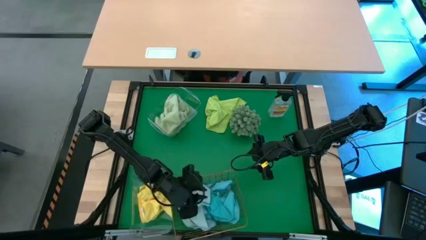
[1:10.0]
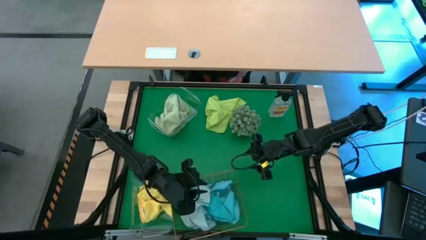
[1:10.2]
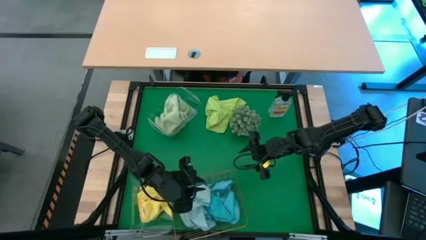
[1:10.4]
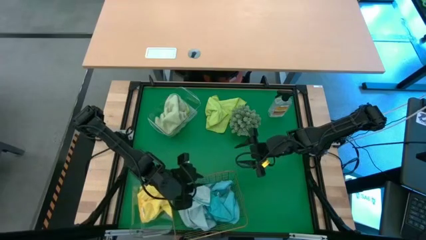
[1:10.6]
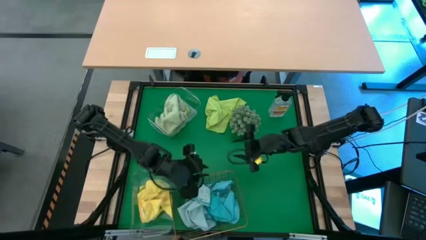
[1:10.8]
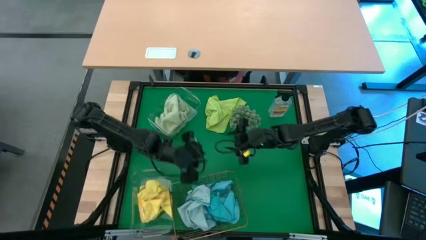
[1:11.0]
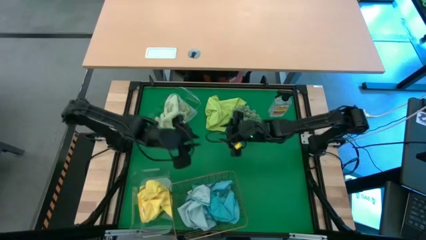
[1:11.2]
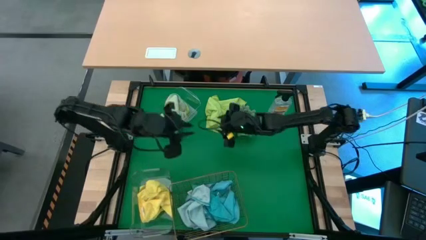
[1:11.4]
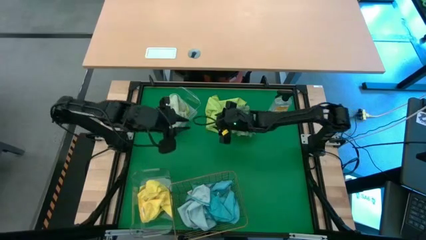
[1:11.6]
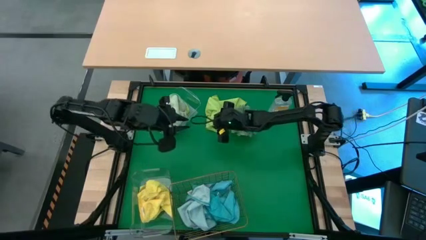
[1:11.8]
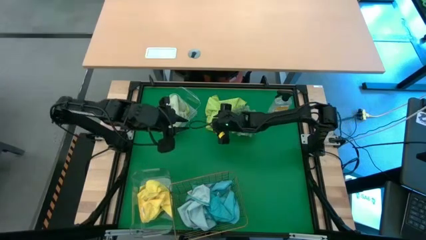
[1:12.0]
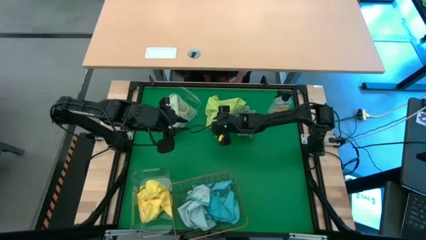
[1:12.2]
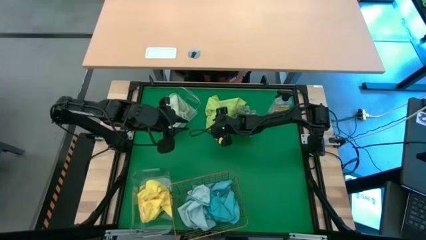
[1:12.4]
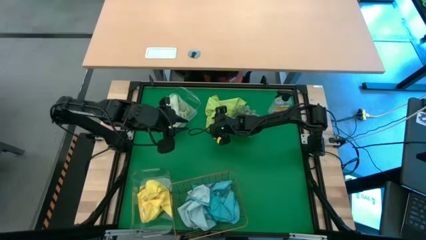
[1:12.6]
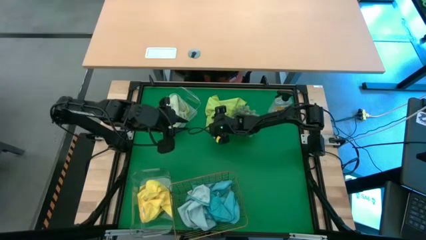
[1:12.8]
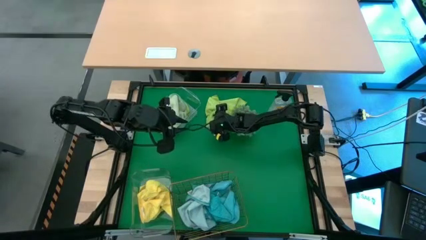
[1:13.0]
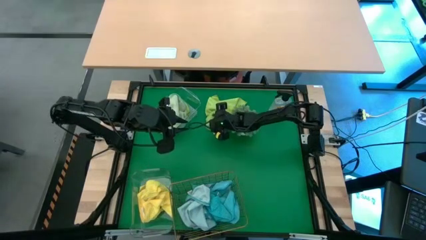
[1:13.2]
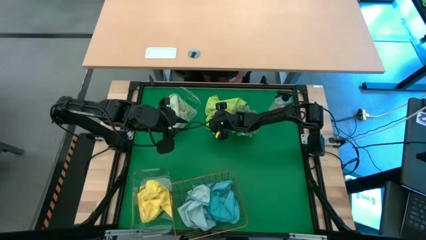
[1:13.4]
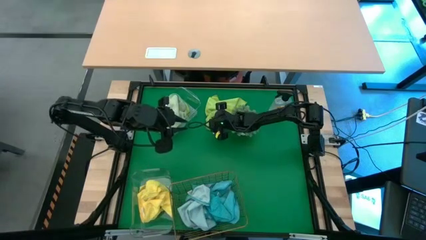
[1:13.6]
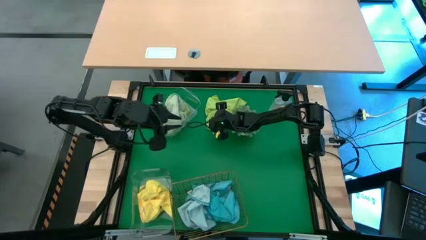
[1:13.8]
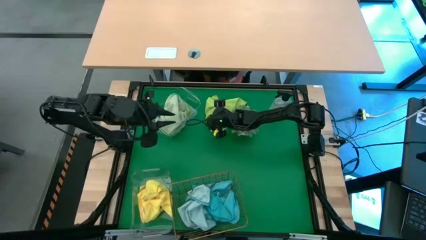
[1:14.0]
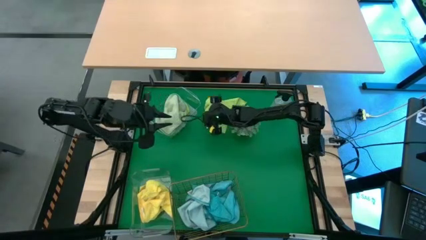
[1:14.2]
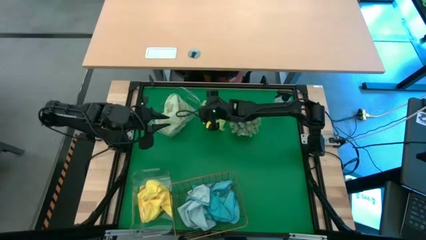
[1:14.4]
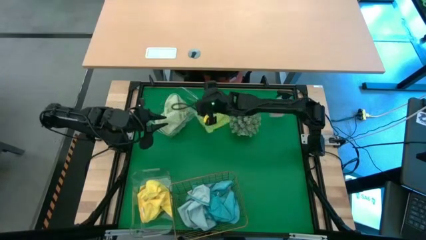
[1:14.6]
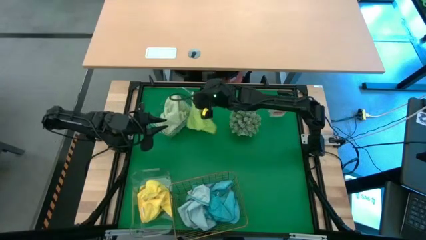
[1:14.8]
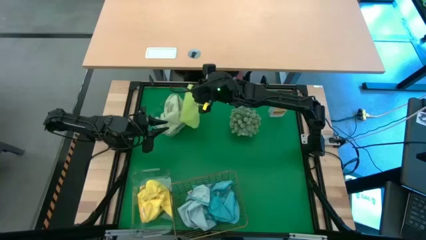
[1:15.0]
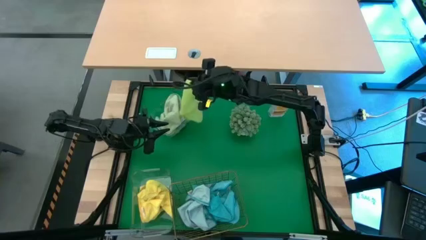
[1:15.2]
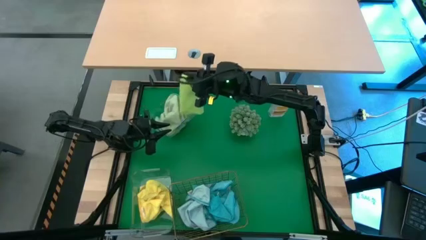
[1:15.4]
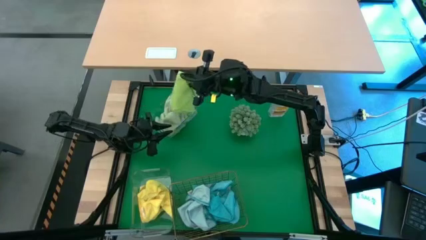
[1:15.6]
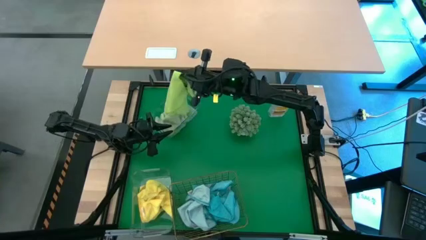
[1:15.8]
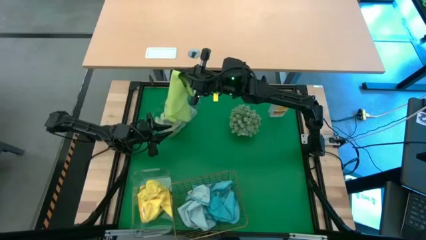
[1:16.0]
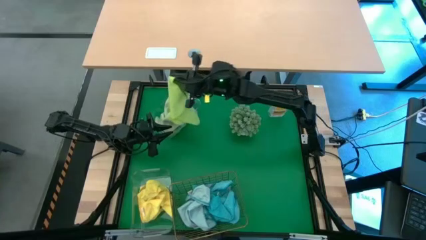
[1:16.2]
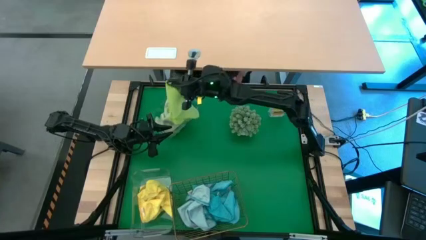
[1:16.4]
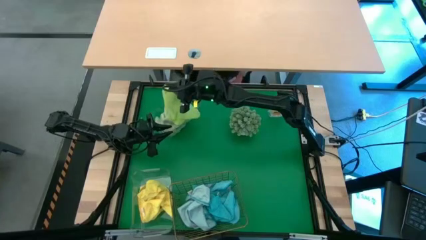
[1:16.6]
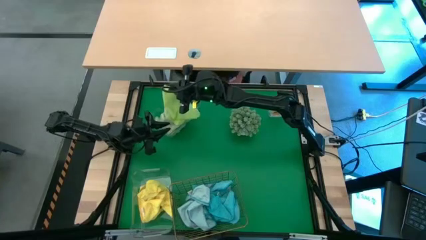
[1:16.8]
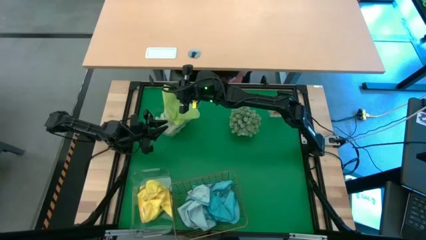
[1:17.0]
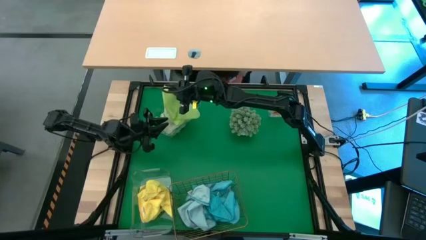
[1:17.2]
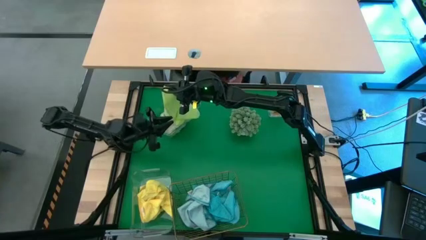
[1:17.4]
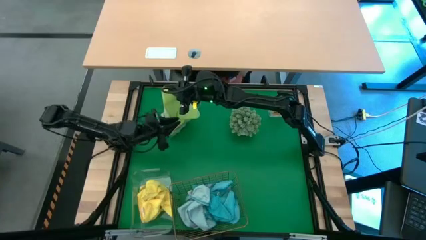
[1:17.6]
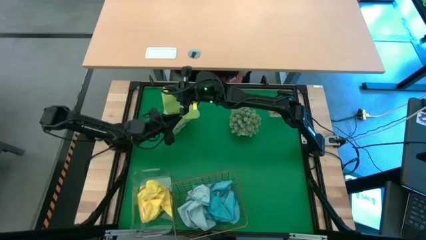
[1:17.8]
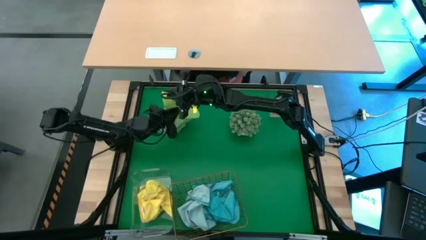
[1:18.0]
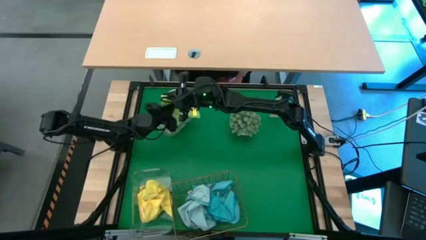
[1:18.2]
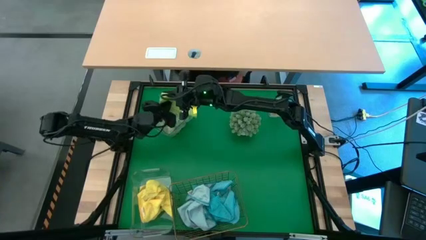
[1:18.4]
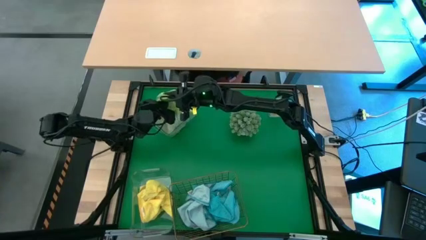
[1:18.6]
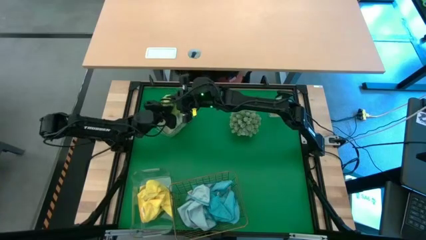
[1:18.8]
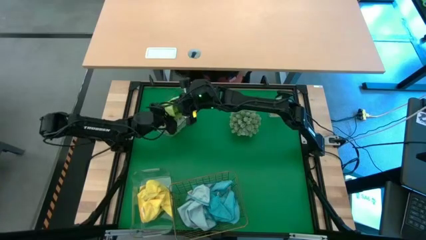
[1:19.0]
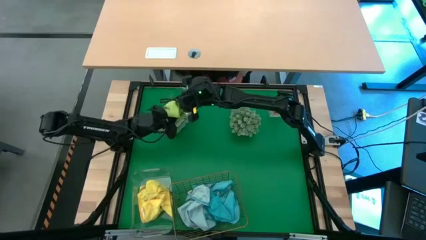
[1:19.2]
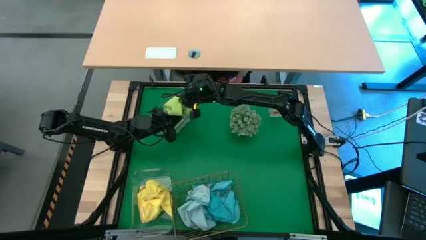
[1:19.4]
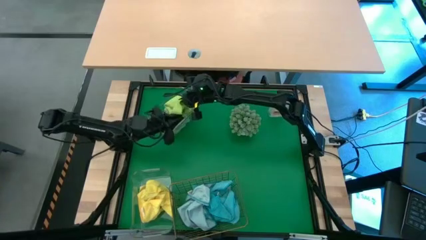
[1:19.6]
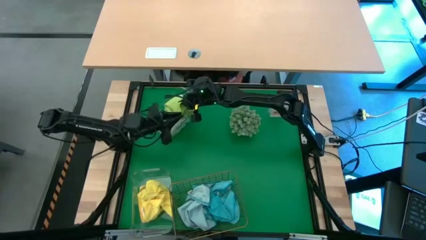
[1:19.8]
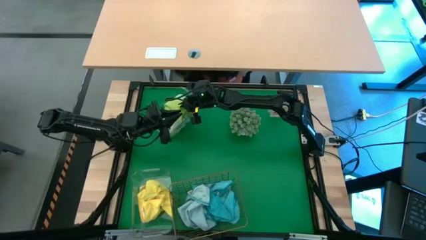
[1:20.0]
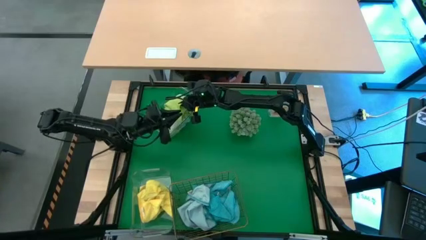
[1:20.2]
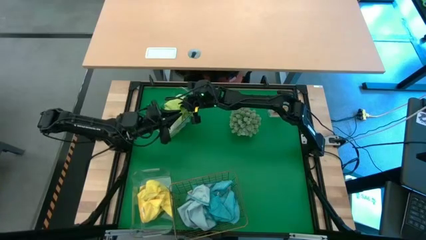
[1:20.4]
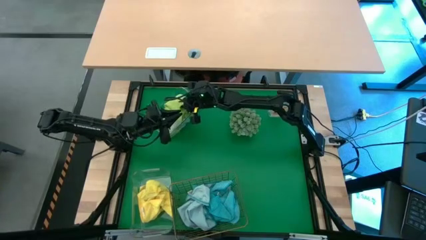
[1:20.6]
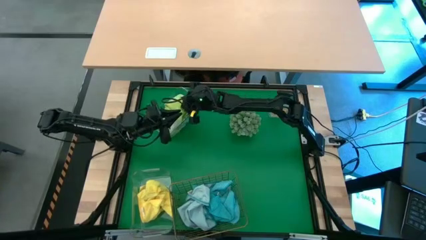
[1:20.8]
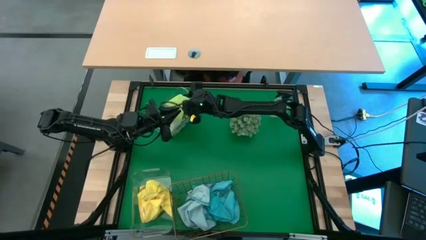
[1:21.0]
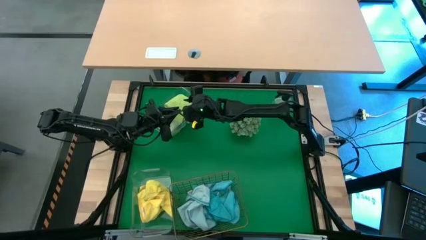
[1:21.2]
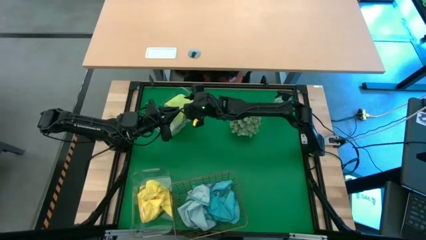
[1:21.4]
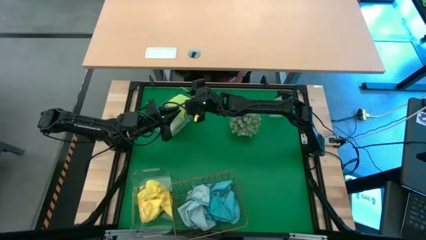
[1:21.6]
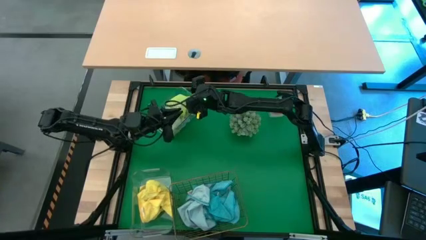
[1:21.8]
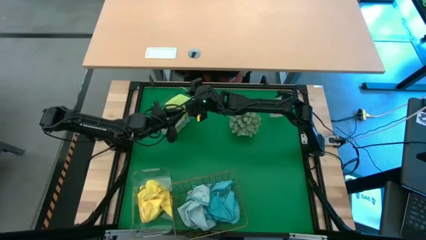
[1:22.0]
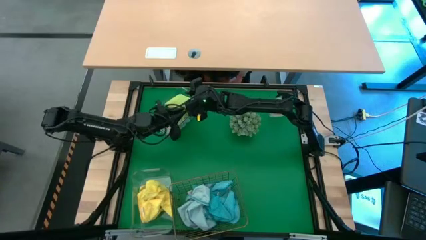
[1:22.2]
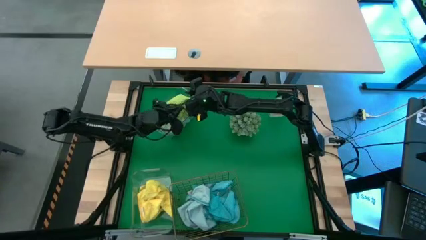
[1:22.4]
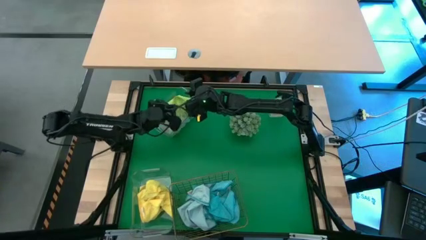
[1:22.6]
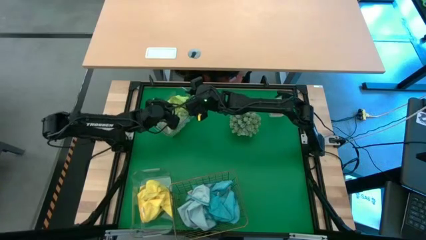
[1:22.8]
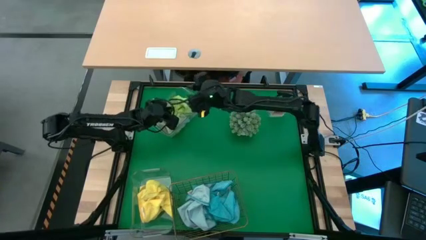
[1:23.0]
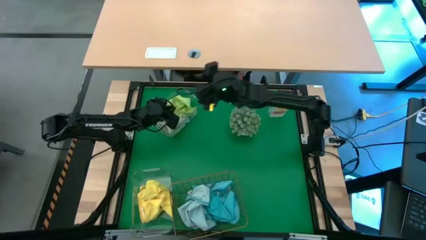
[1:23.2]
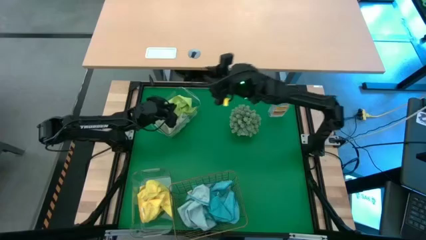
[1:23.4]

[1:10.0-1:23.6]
Task: Sort microfiber towel by color & place in baskets
Put the yellow green microfiber towel into the transparent bin

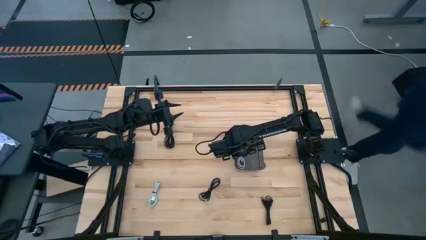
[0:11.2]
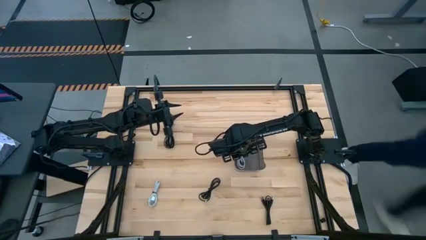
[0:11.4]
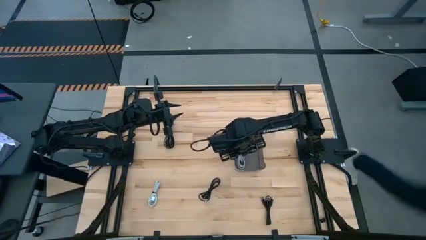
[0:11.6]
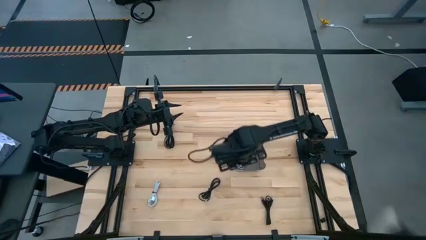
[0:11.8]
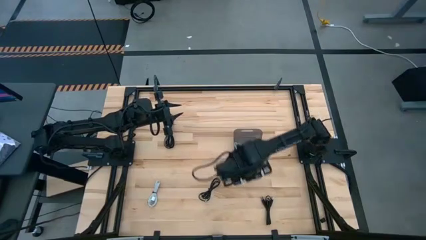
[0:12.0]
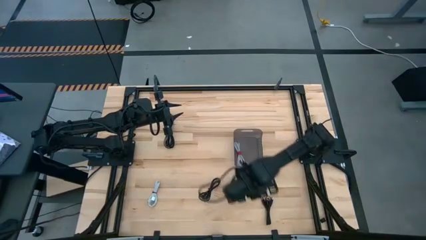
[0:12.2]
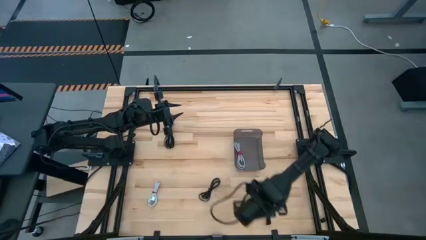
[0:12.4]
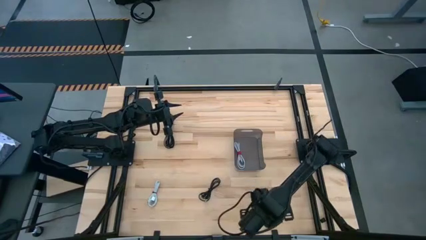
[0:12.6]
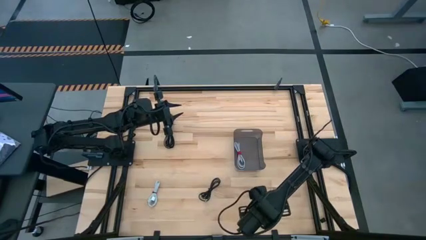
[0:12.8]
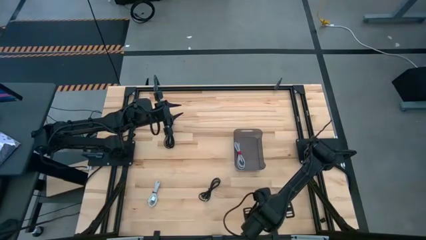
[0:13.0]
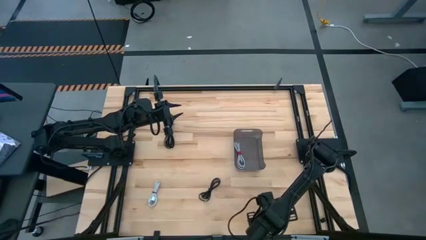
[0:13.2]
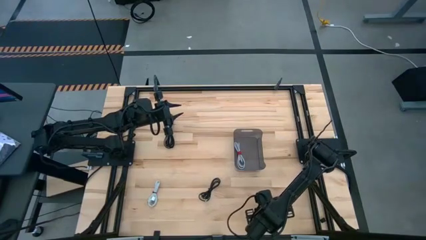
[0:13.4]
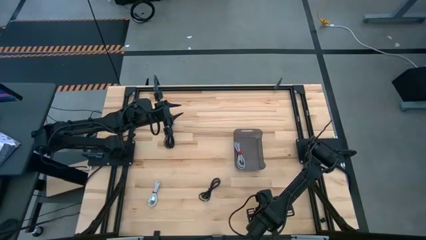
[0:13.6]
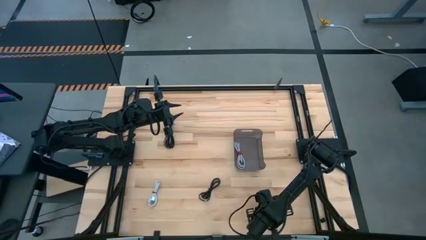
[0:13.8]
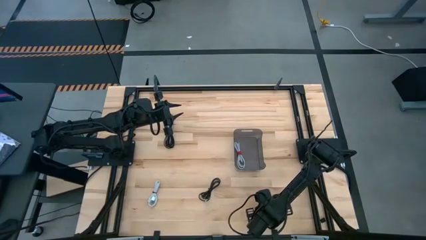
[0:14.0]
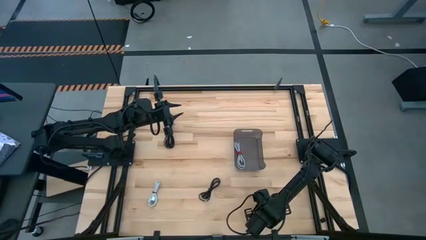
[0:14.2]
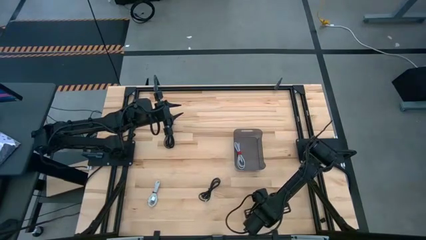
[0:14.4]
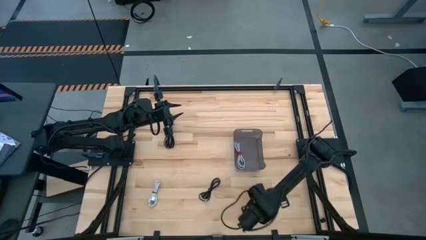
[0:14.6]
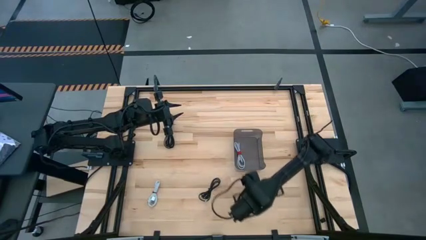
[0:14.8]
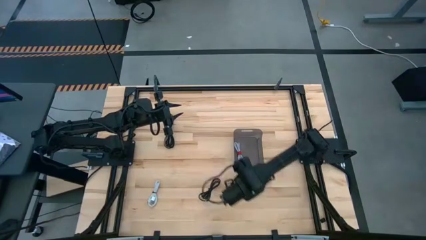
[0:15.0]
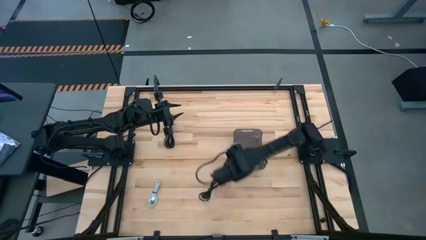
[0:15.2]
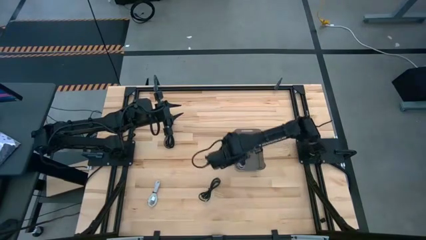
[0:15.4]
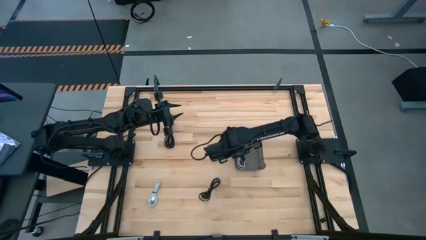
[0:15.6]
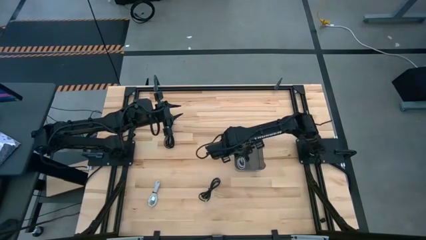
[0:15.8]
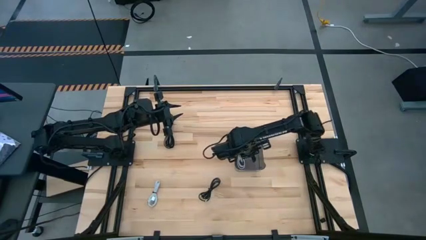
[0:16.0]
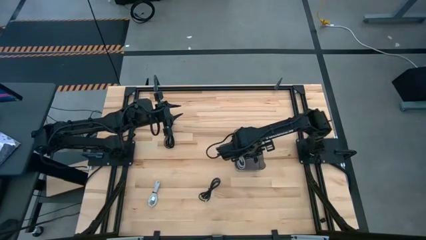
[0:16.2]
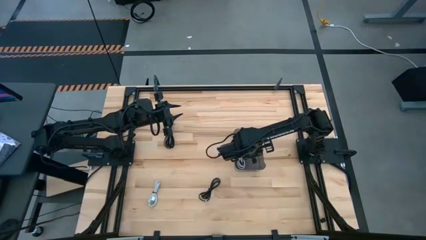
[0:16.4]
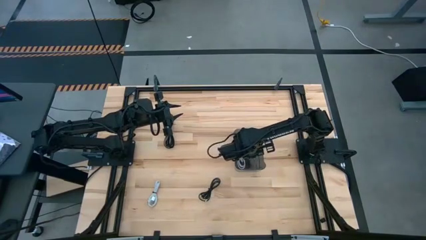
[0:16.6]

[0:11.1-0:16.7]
Task: Pick and place USB-C Cables
Put the bottom black charger cable into the black bin
